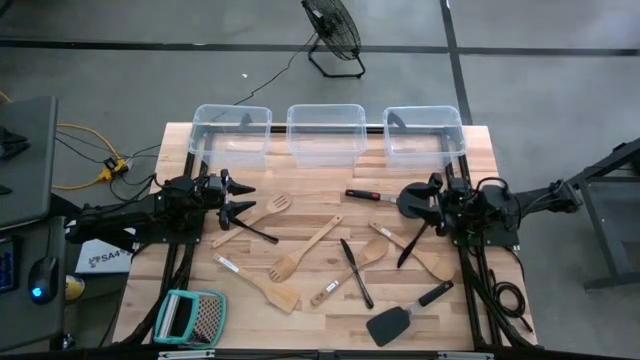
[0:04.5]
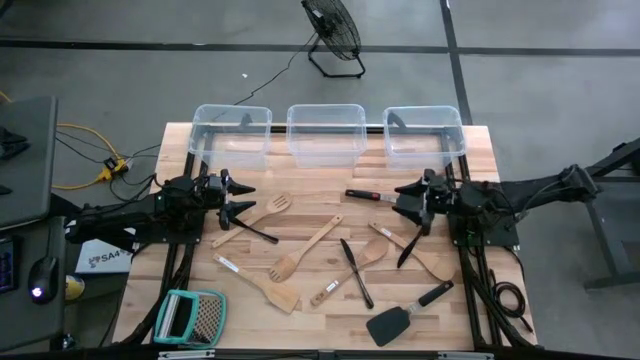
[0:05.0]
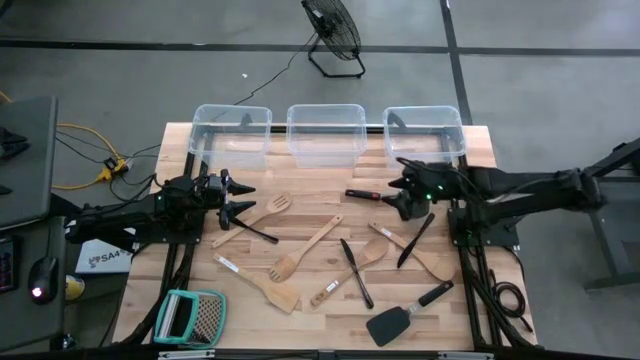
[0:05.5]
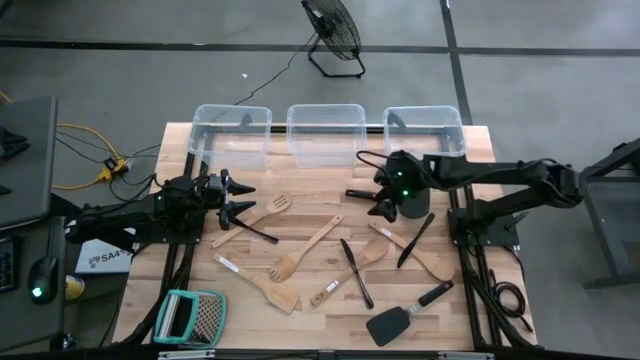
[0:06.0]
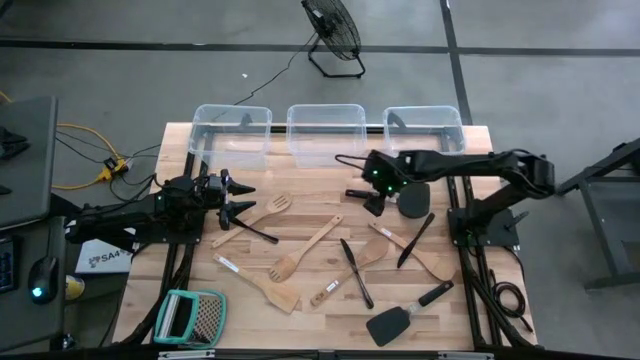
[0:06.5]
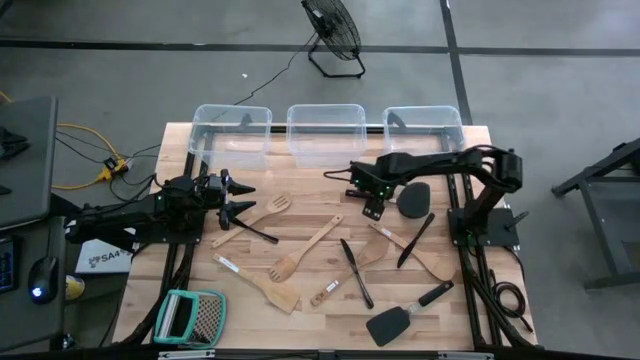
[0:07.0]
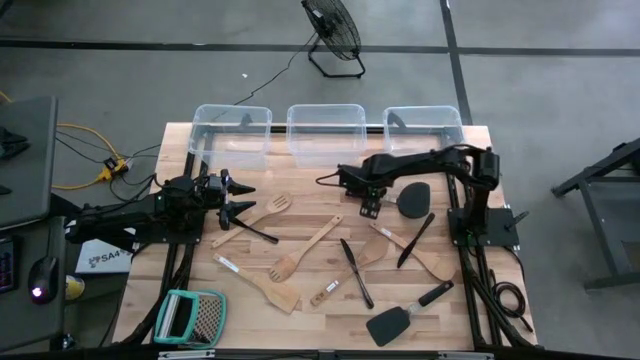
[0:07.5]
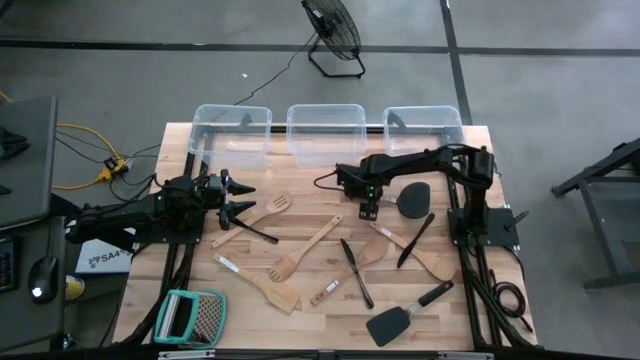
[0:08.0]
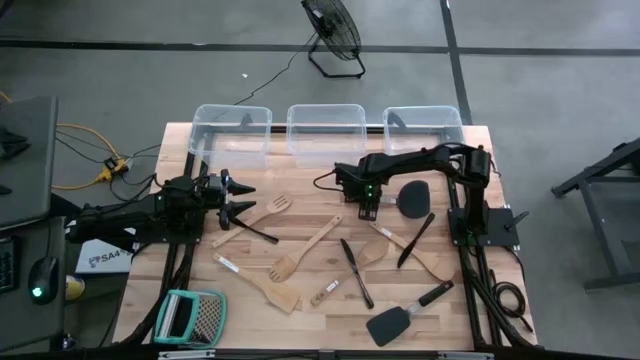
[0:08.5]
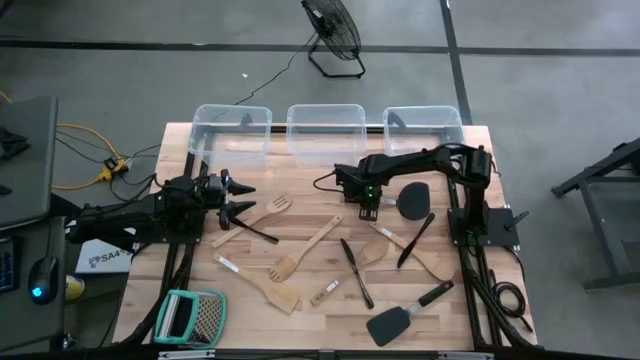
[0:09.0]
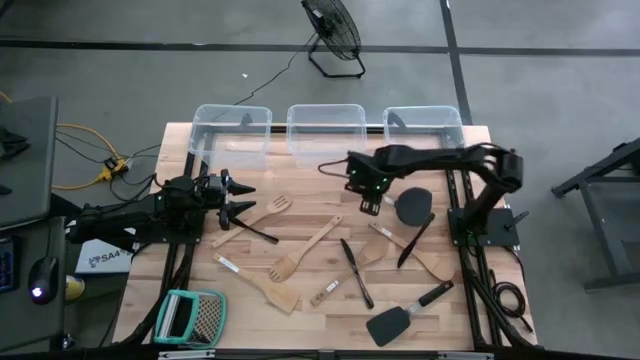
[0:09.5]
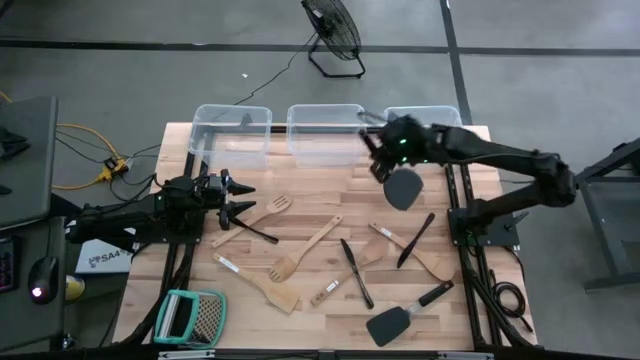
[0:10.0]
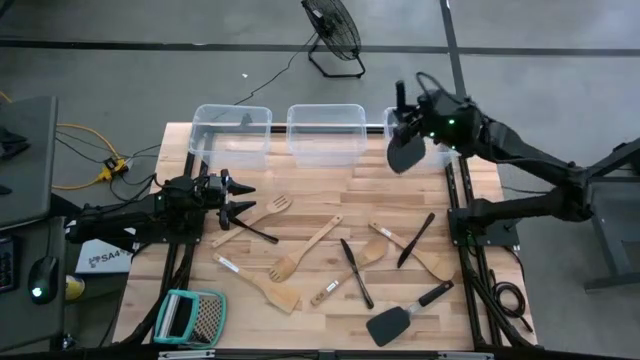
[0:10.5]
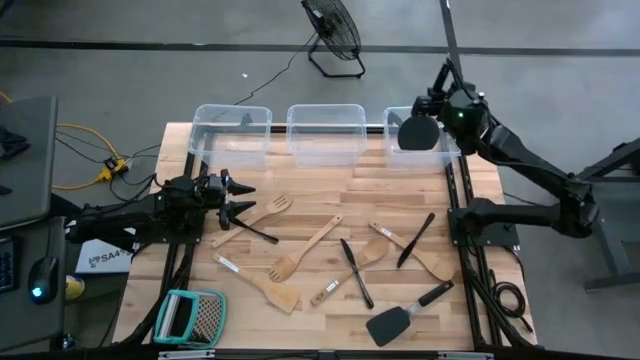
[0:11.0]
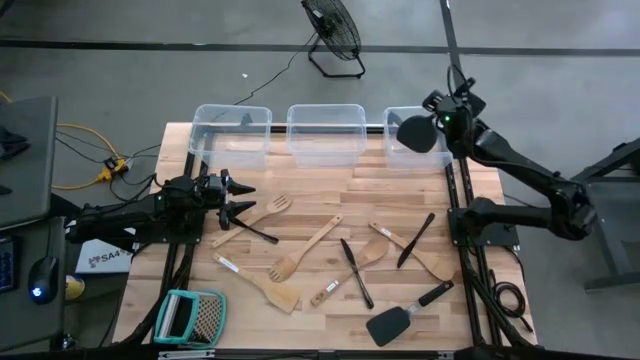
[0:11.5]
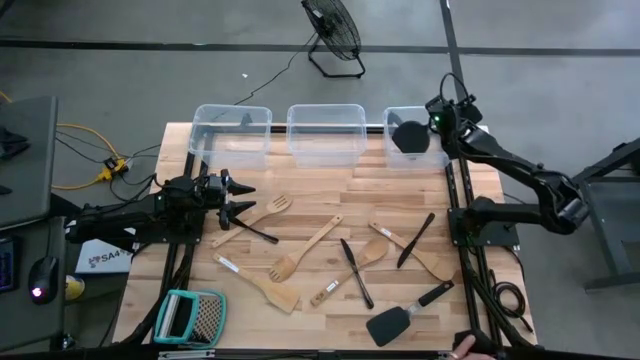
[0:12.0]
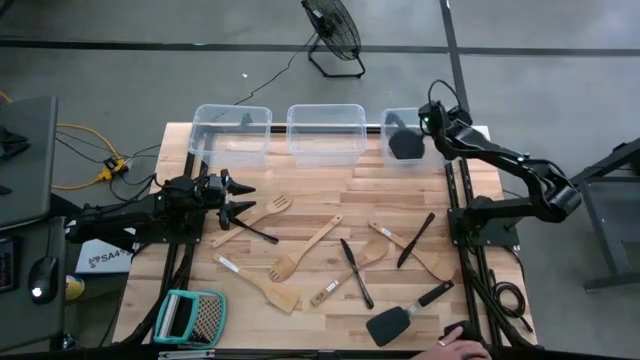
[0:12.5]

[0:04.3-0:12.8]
Task: Pick & Place Kitchen Items
Put the black spatula into the right transparent bin

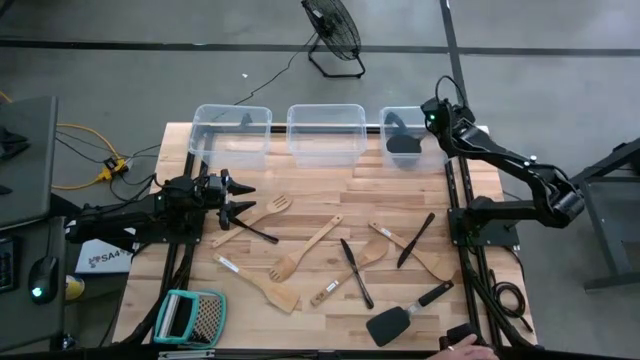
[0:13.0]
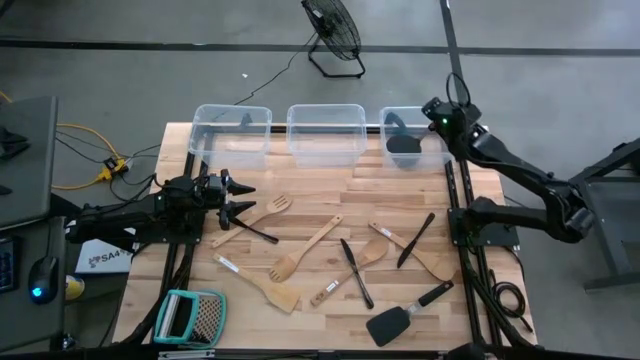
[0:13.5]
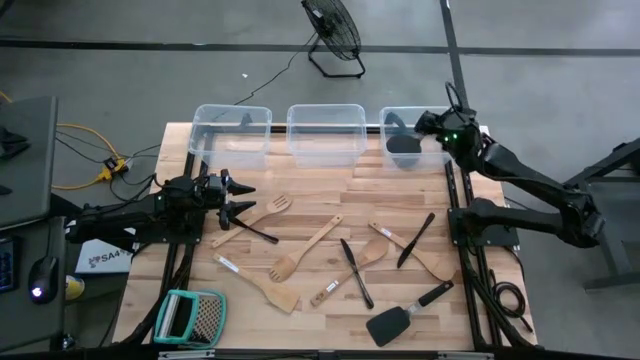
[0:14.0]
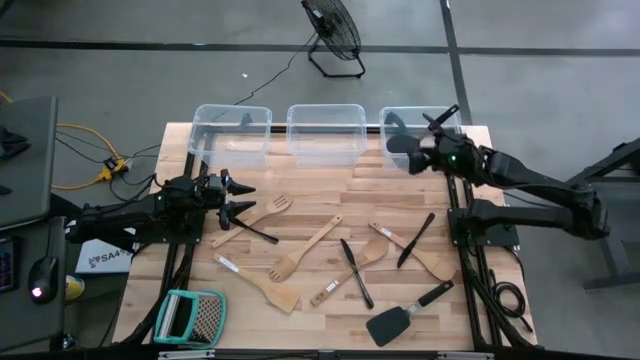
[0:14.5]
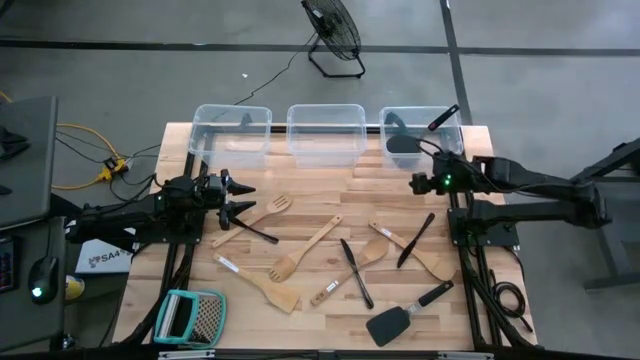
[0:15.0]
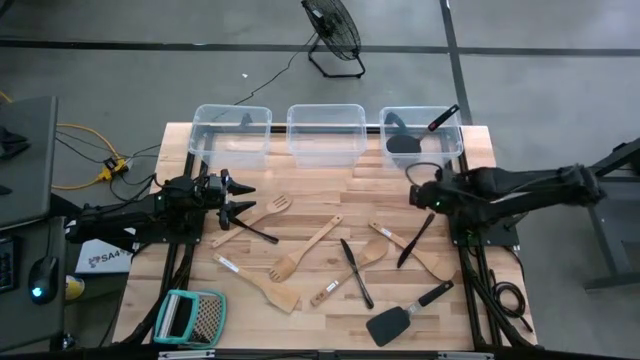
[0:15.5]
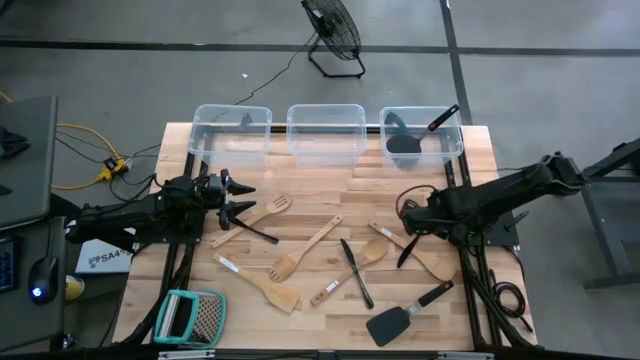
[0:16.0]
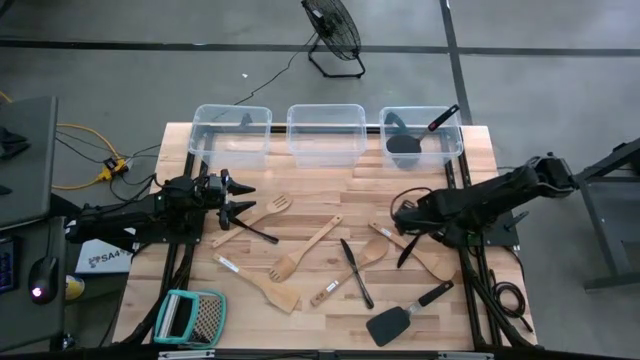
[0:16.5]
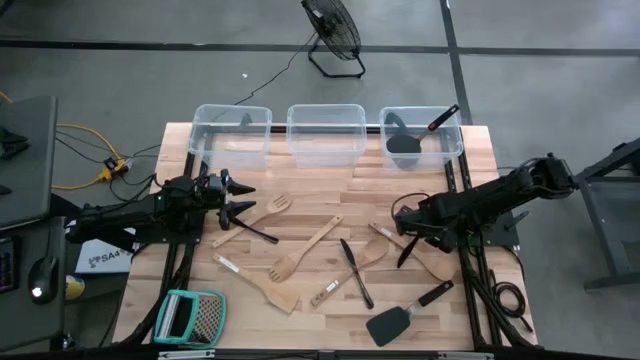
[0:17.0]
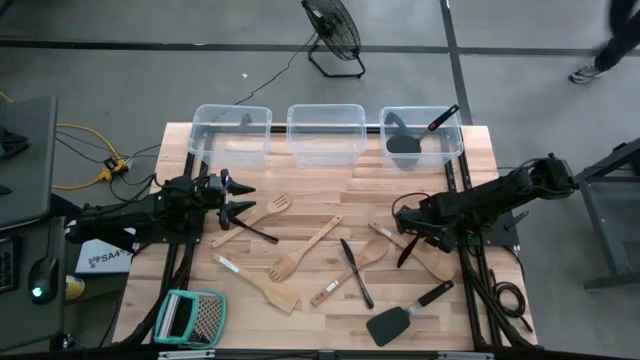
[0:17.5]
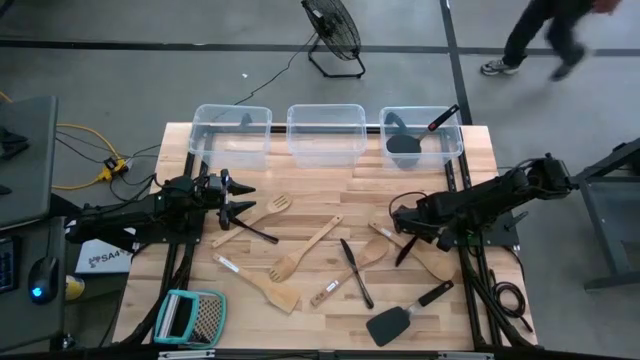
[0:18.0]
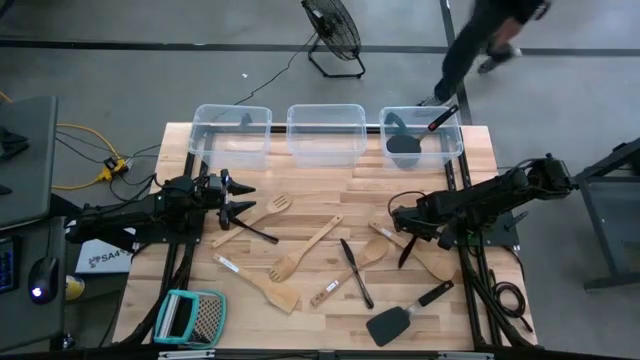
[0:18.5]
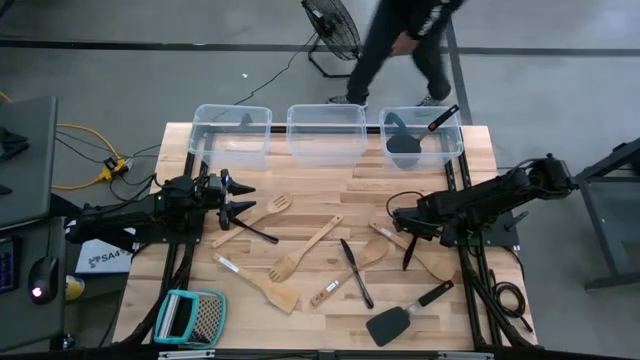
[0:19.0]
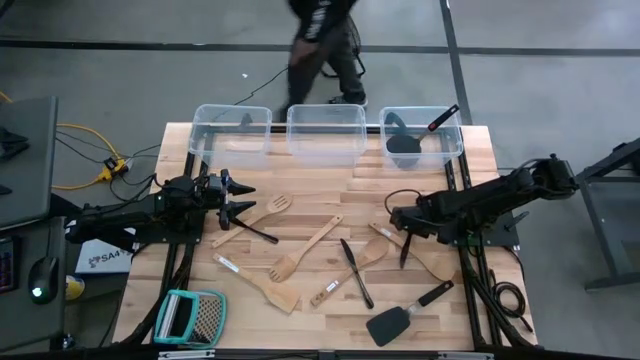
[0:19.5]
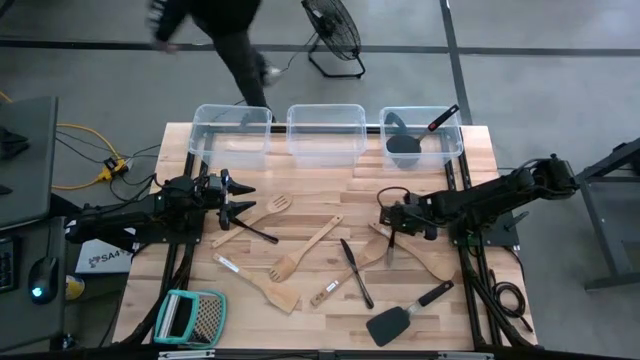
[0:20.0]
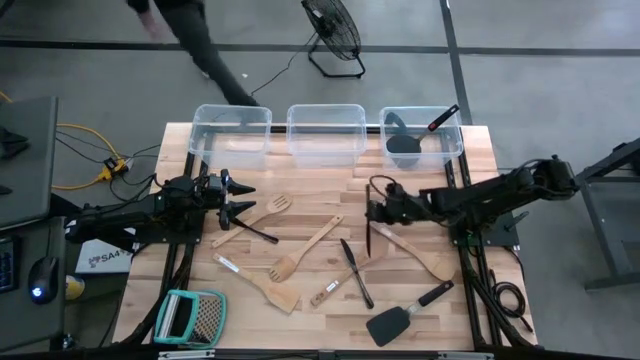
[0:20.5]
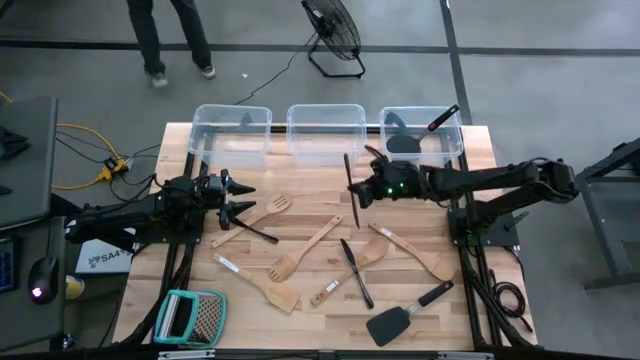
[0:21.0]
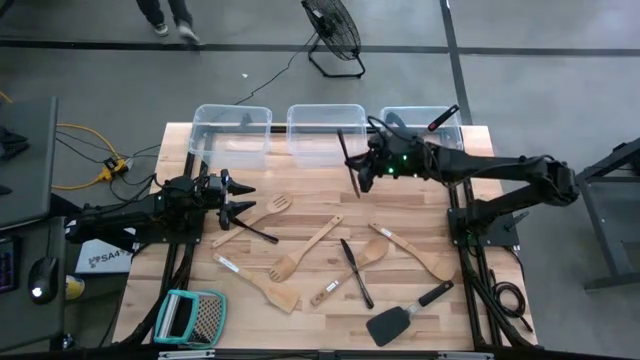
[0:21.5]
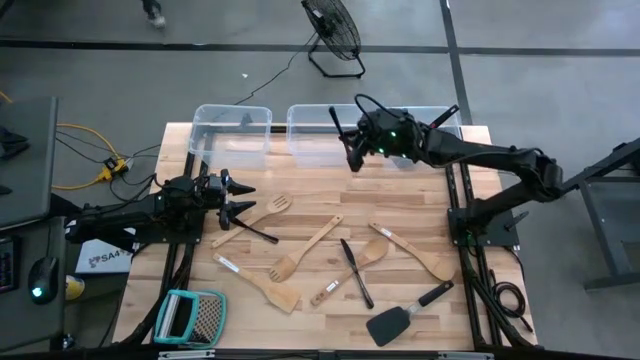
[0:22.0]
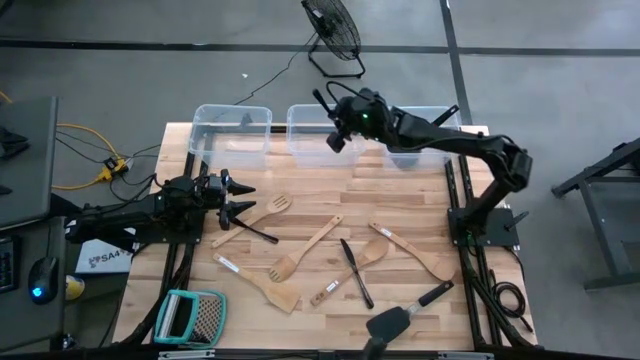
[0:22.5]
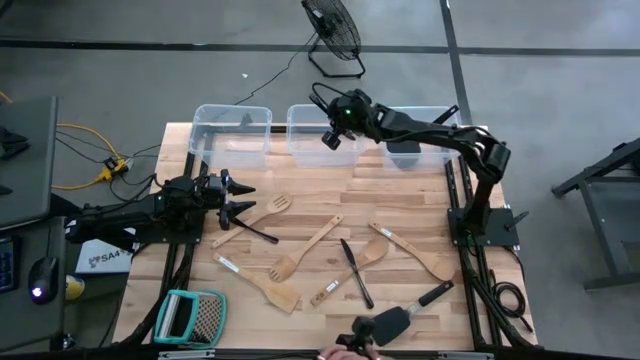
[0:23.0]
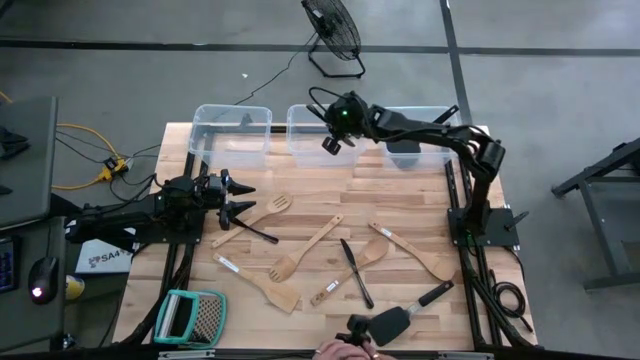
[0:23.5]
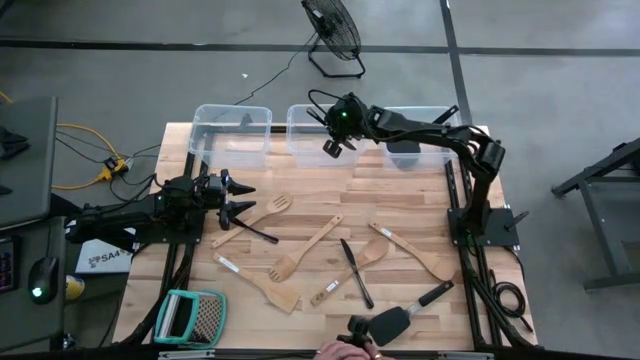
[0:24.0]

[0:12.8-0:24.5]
Put the right table knife into the middle transparent bin
